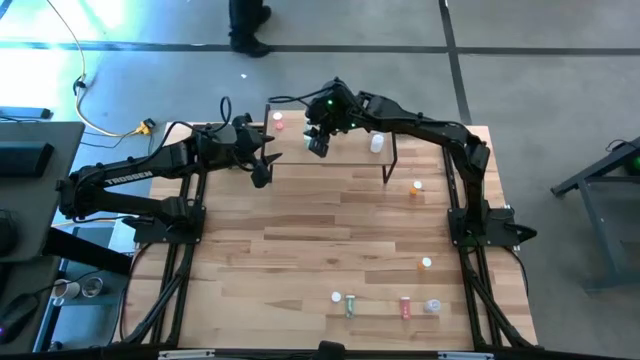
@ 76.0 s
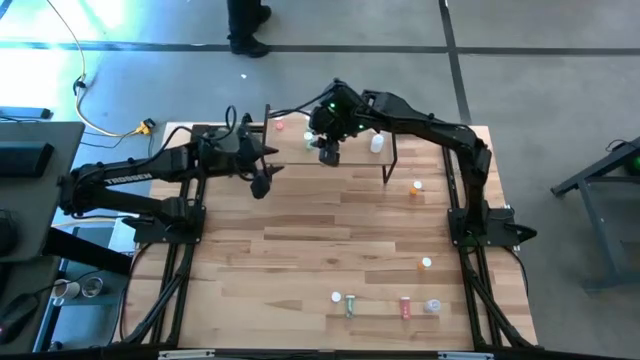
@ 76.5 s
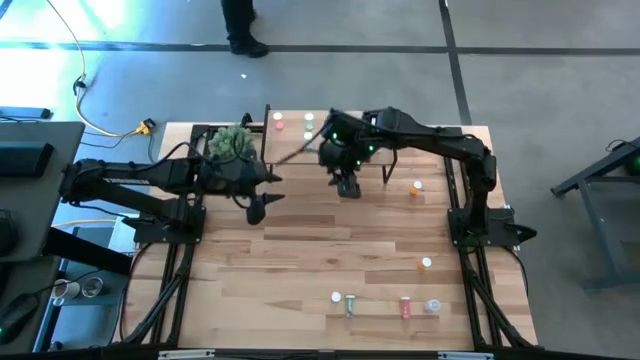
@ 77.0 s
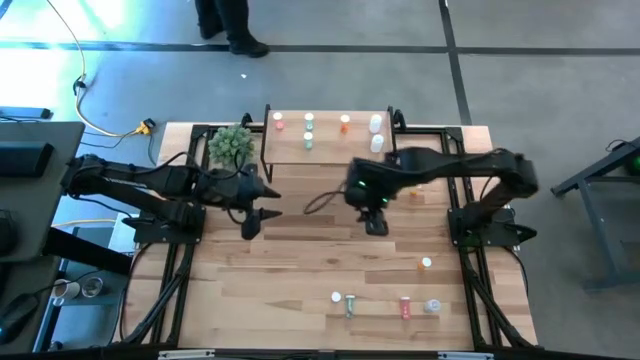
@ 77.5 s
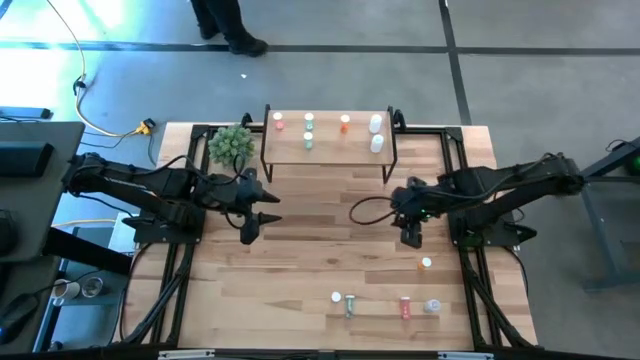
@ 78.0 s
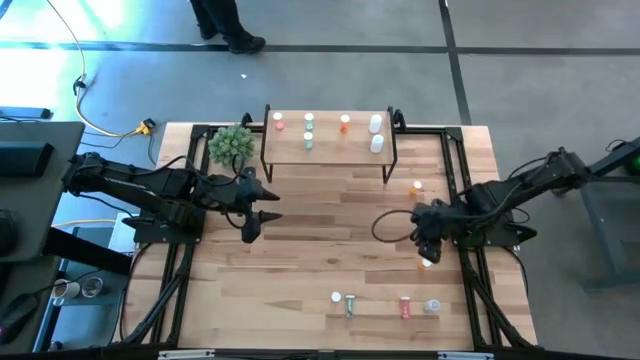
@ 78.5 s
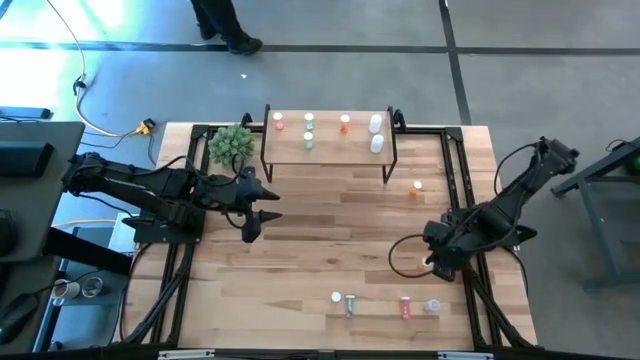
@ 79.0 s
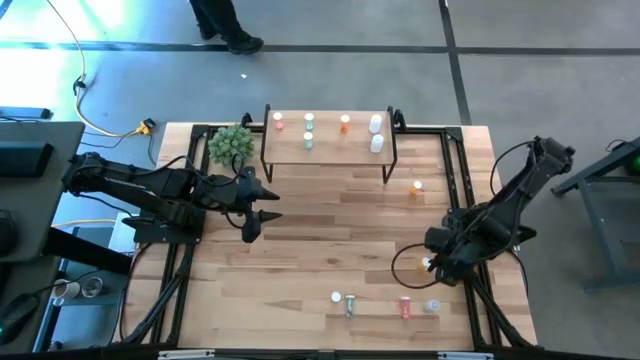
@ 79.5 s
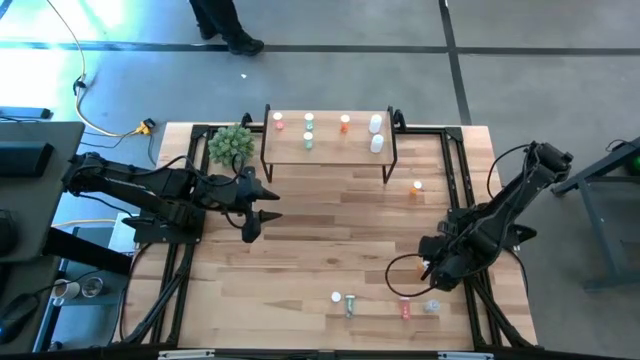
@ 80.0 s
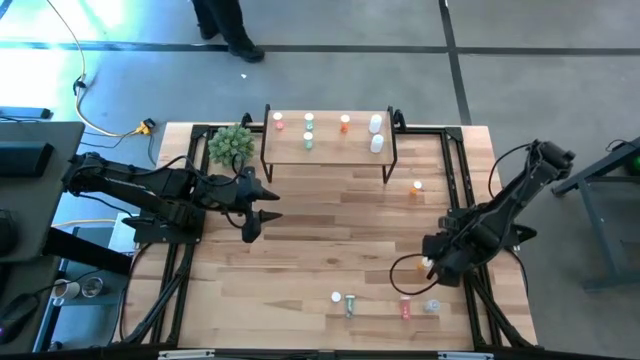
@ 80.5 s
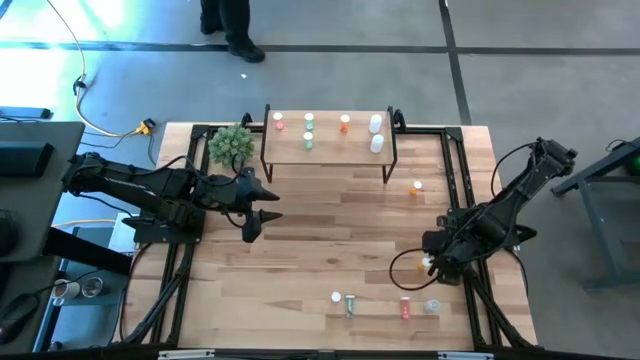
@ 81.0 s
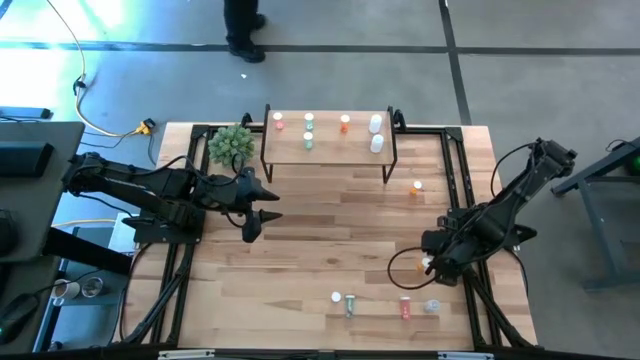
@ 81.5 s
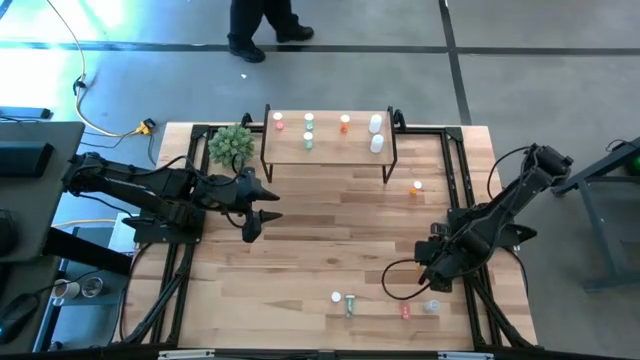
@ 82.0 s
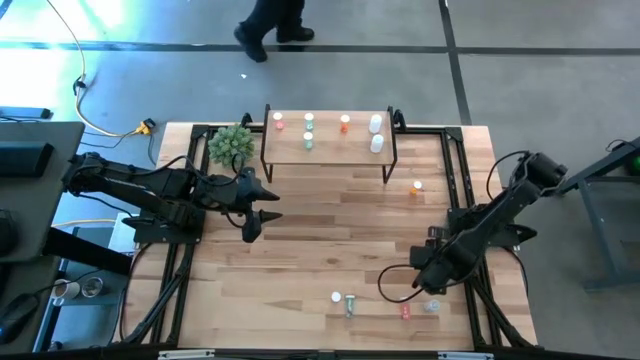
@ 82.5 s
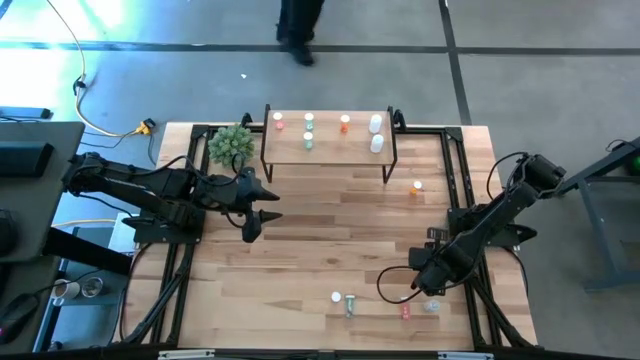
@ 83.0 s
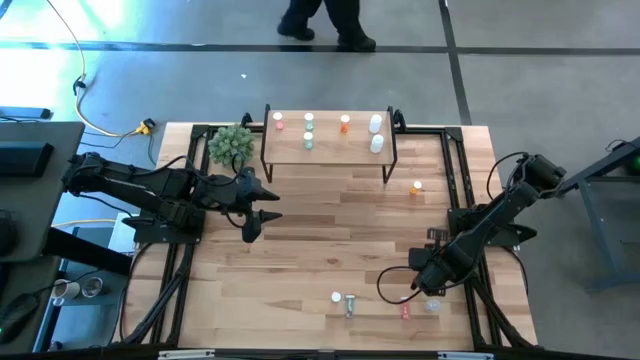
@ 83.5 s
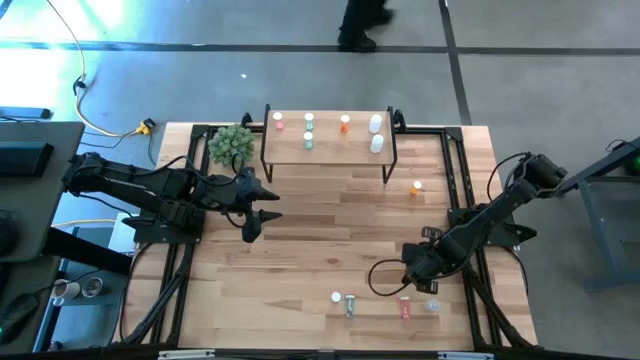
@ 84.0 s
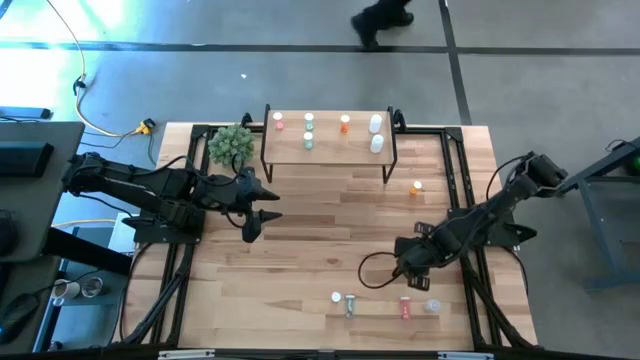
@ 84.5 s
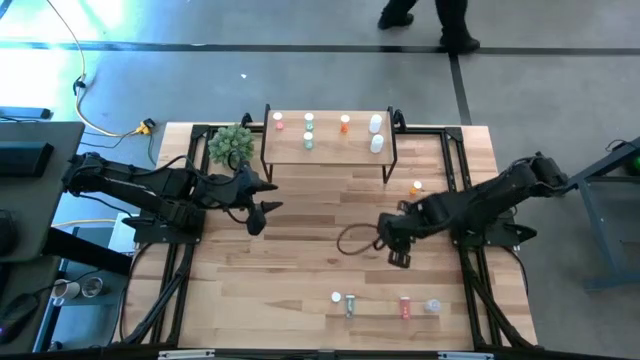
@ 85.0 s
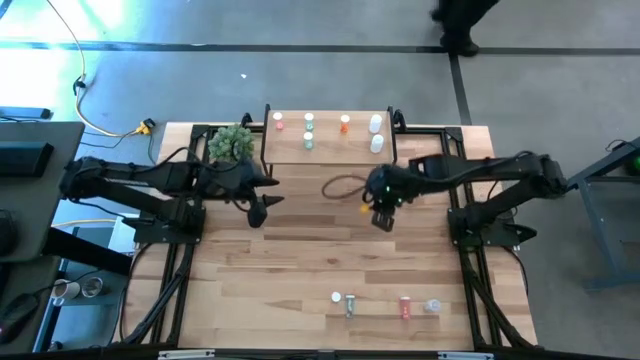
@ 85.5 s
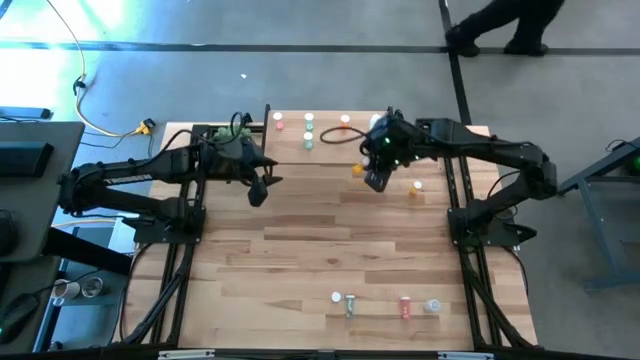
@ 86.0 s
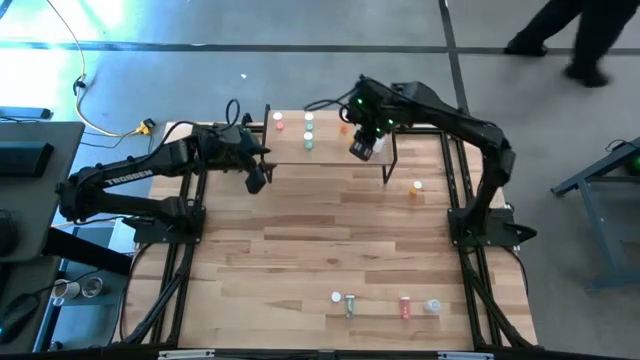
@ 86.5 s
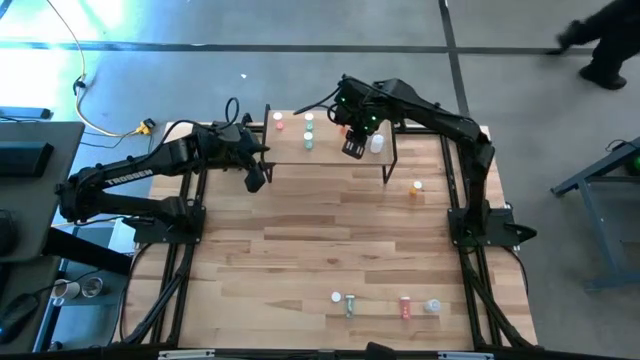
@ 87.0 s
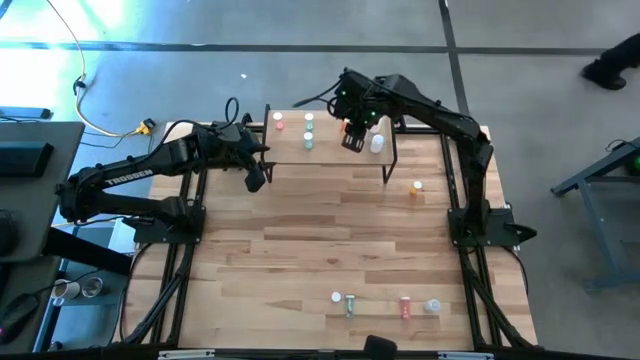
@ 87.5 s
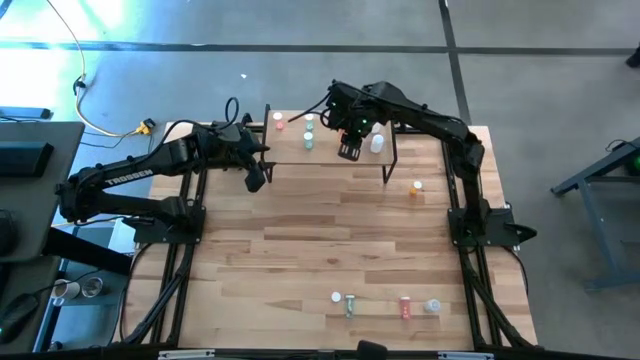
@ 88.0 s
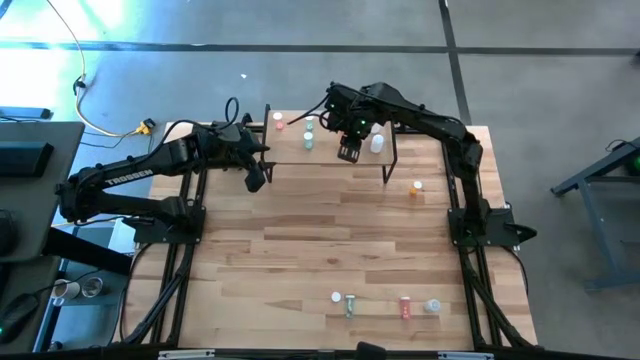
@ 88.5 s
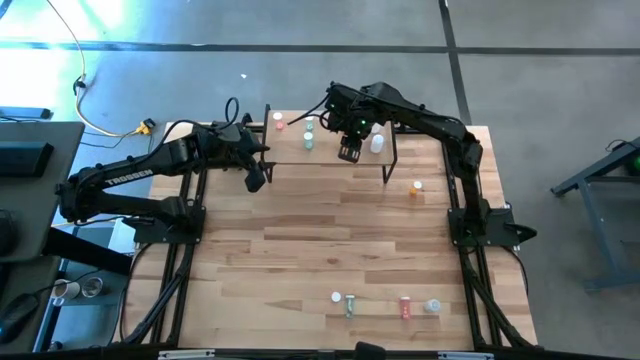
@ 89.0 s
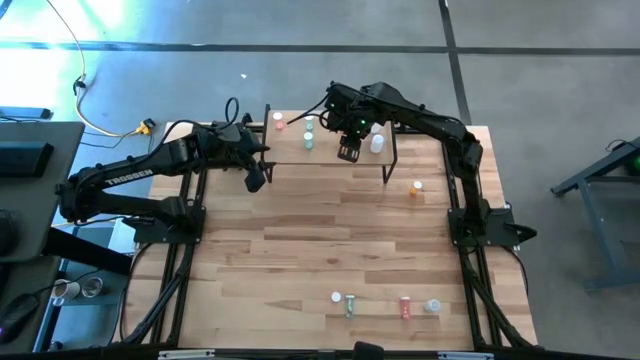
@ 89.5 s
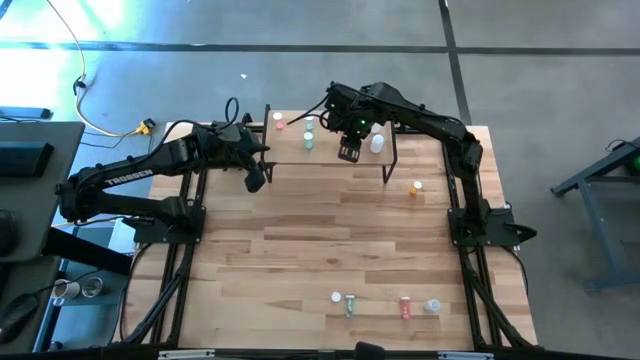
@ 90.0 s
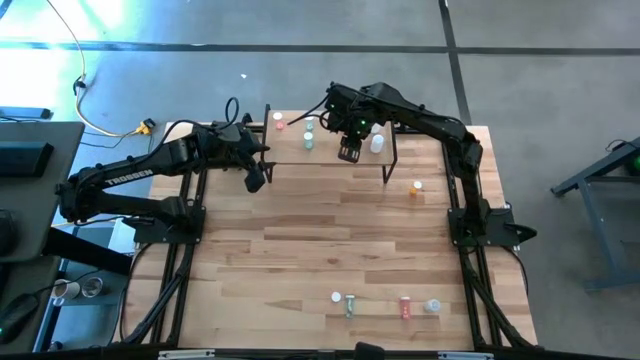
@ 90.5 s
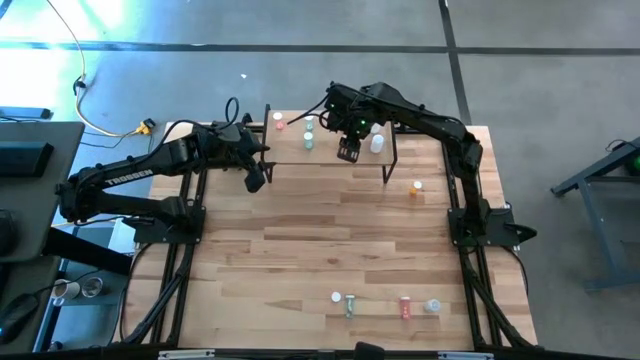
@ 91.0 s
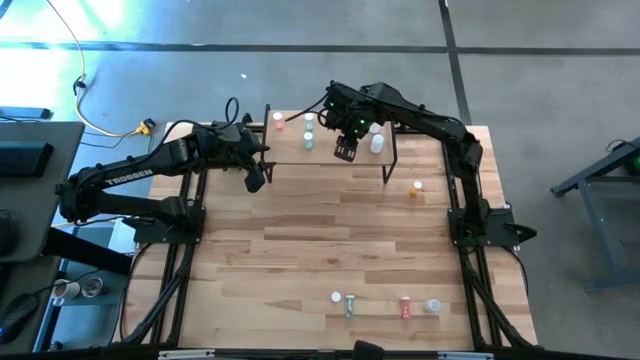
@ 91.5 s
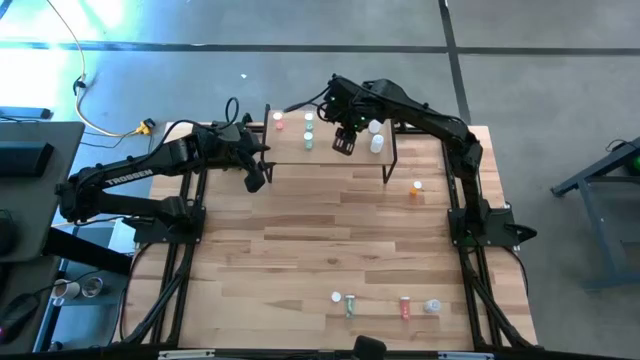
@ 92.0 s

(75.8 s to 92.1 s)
Task: Pick and place medicine bottles onto shelf by color
Put the bottom orange pill bottle on the shelf aligned with the other orange pill bottle

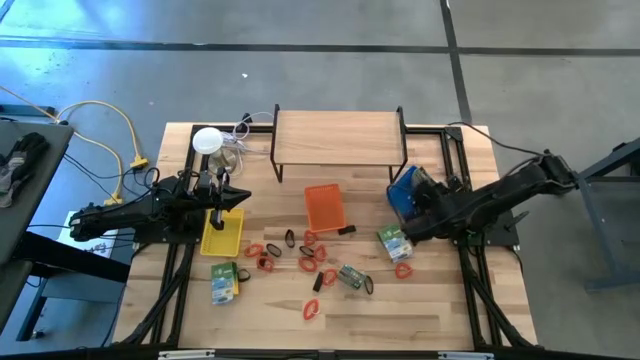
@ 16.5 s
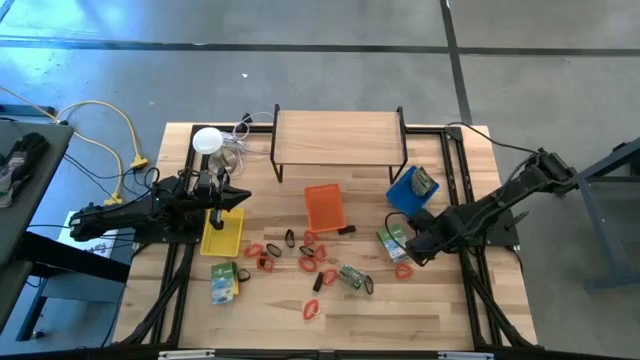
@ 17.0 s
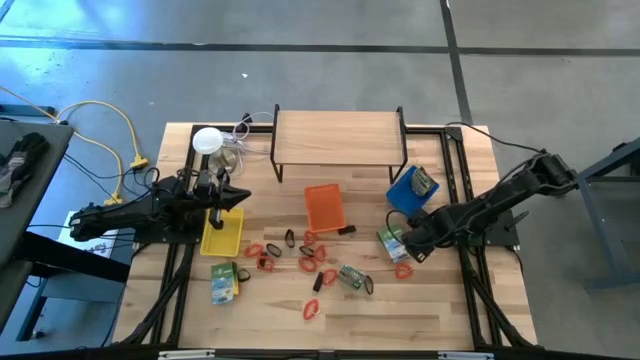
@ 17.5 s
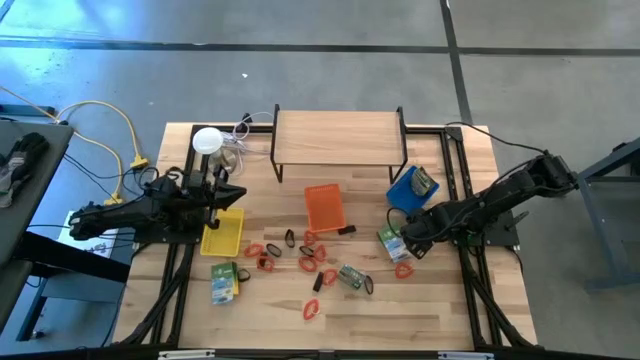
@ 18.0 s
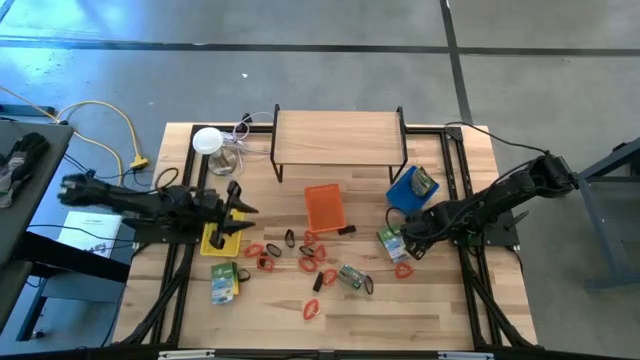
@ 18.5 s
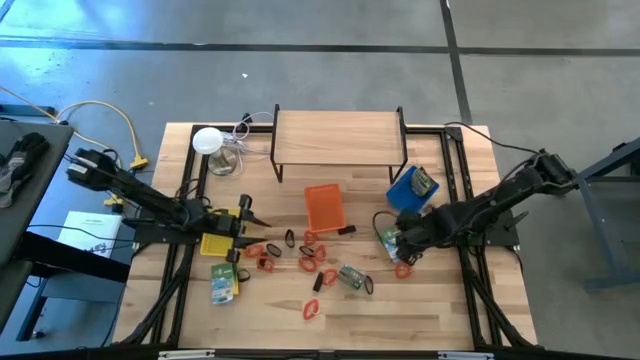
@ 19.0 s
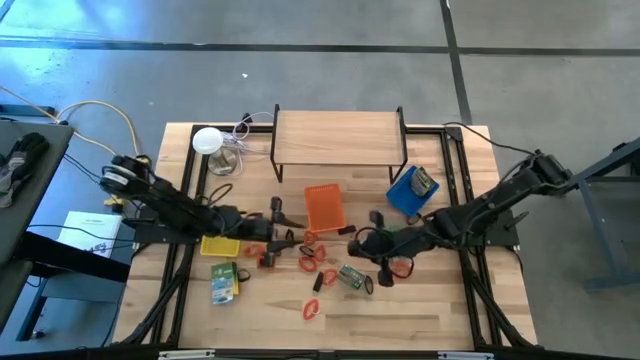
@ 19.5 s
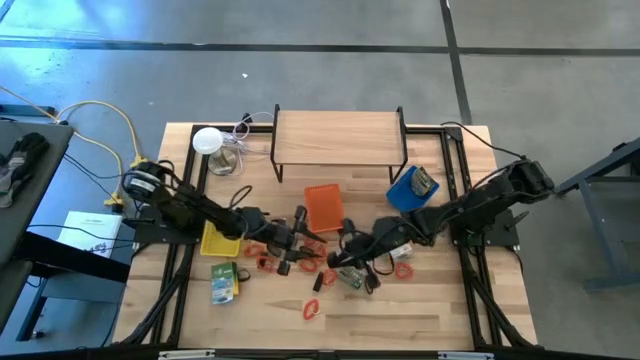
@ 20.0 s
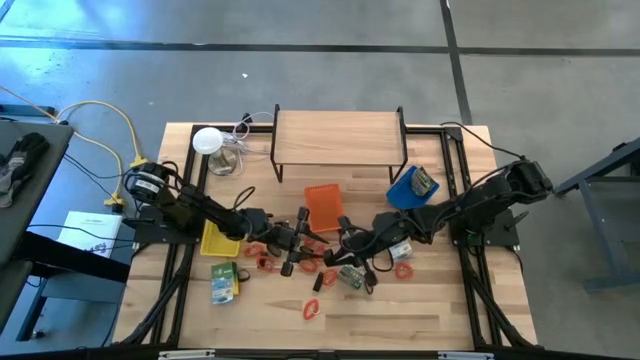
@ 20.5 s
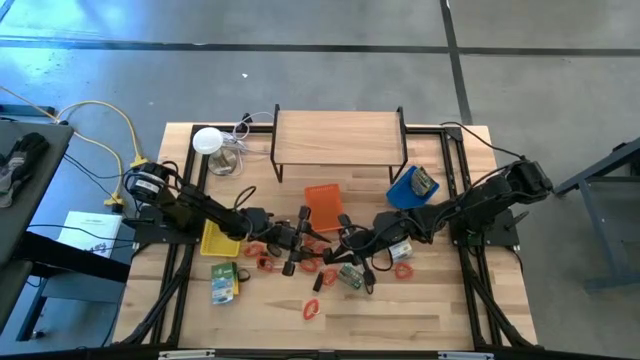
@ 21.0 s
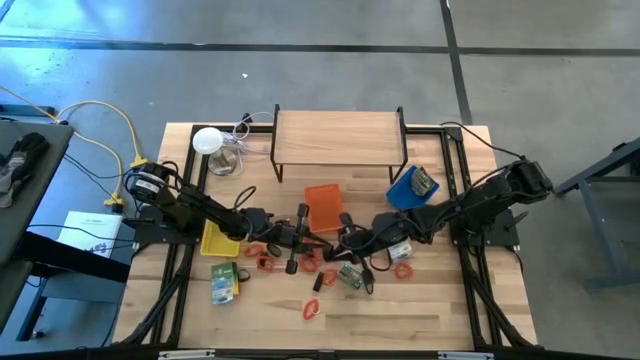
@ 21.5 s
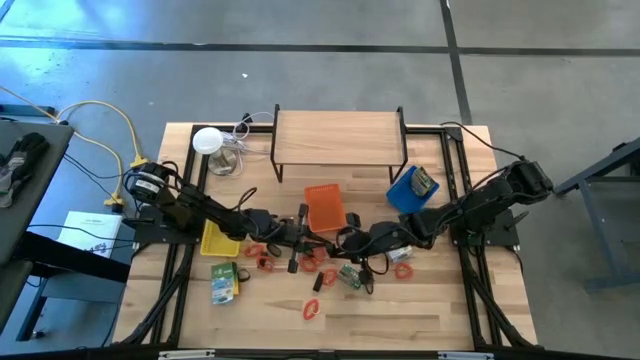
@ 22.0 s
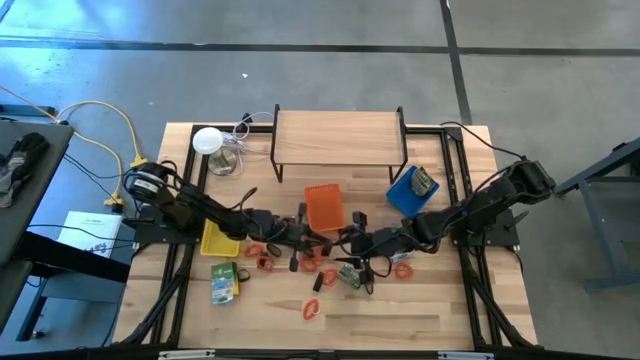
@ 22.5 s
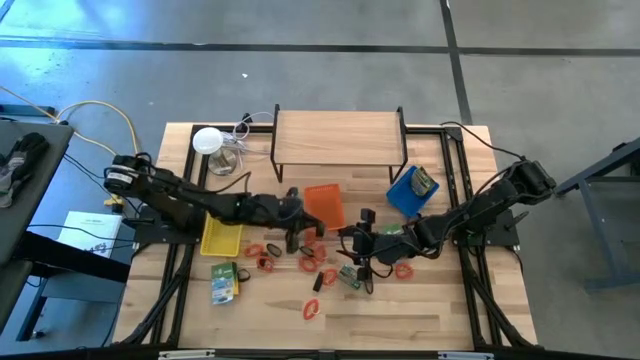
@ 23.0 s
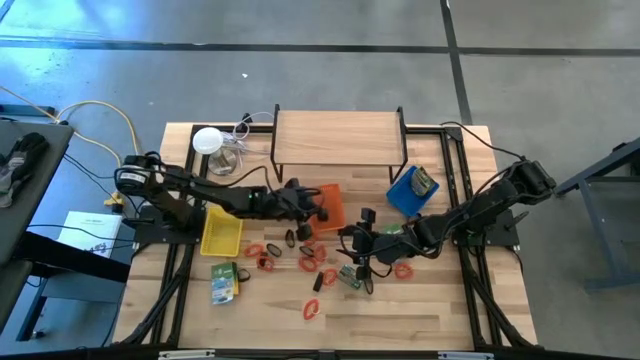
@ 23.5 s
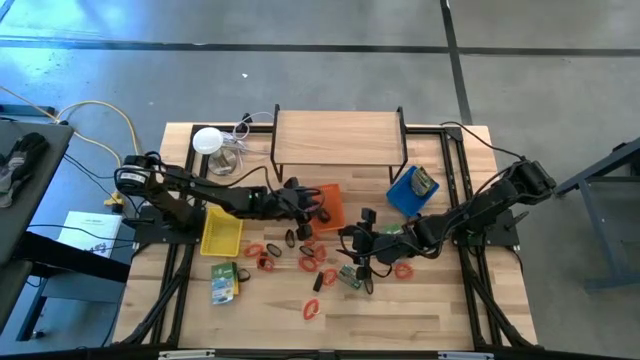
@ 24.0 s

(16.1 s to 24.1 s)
Task: Pick & Place Office Desk Supplies
Put the black rubber band into the orange bin
